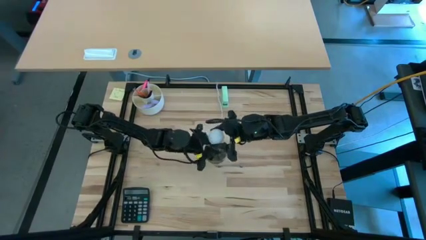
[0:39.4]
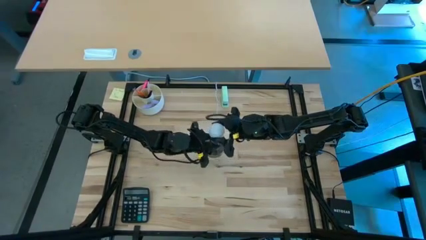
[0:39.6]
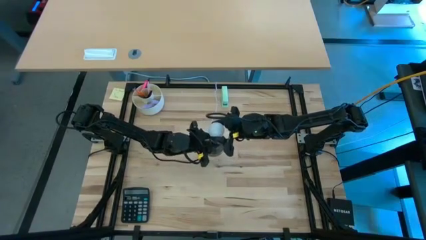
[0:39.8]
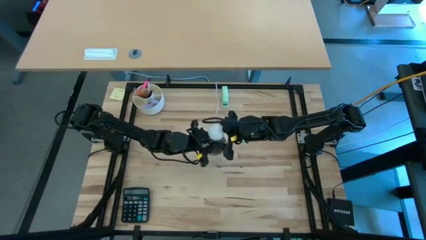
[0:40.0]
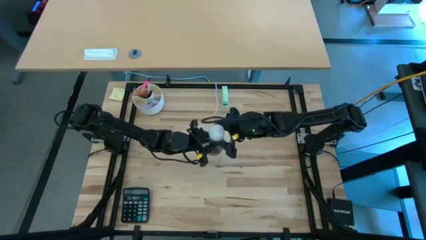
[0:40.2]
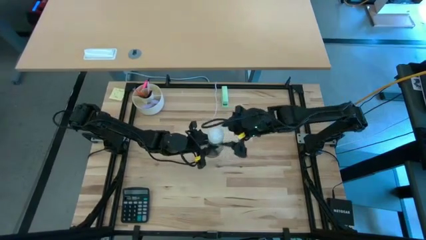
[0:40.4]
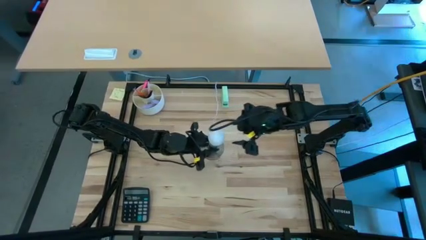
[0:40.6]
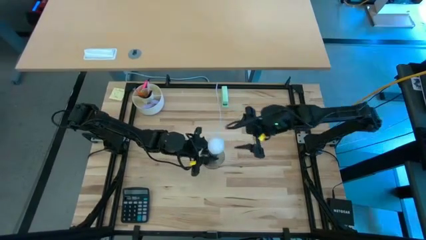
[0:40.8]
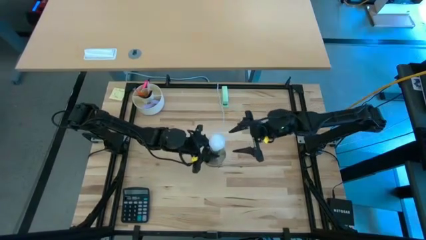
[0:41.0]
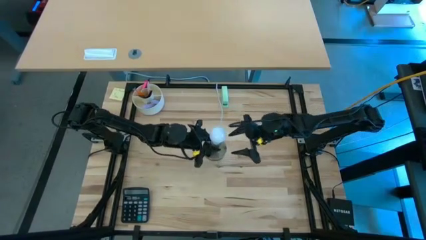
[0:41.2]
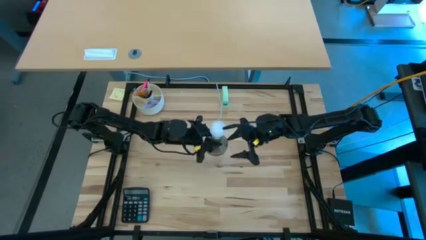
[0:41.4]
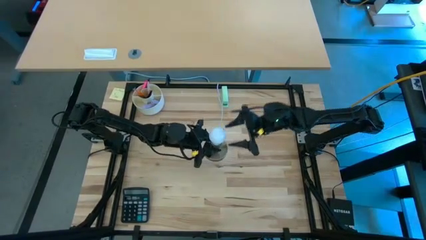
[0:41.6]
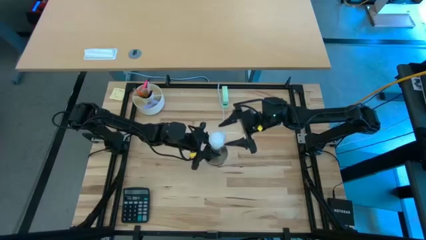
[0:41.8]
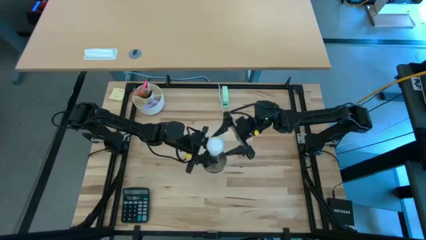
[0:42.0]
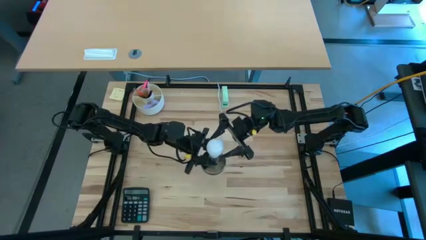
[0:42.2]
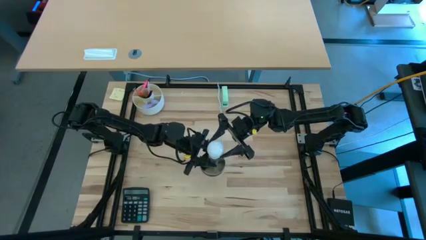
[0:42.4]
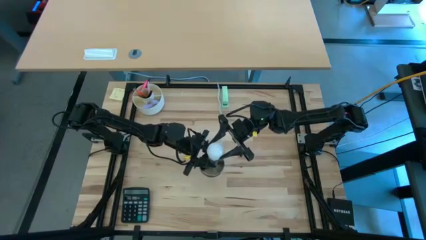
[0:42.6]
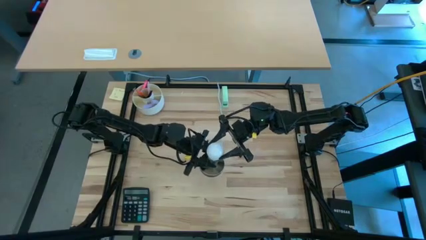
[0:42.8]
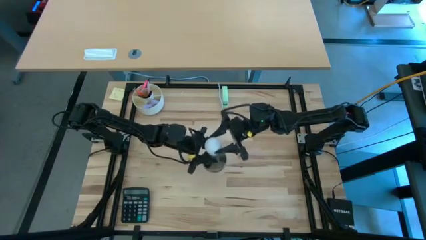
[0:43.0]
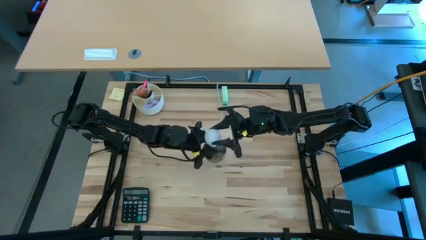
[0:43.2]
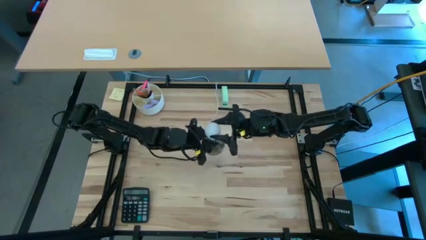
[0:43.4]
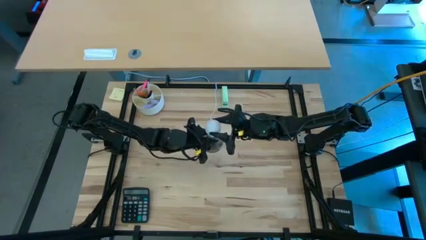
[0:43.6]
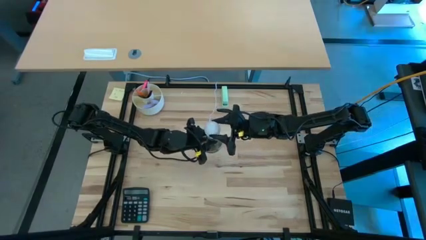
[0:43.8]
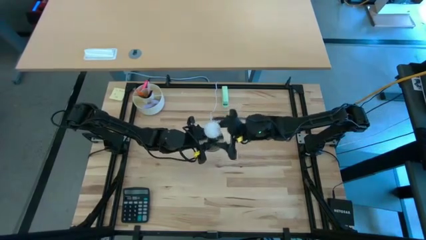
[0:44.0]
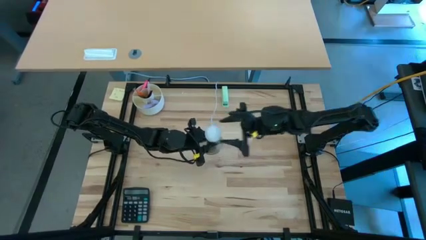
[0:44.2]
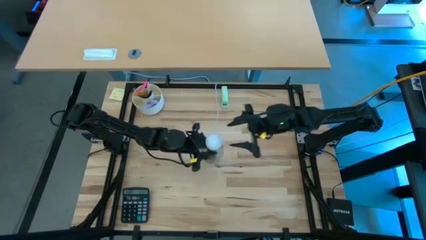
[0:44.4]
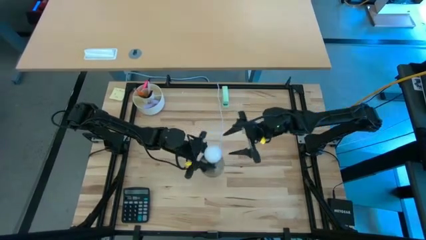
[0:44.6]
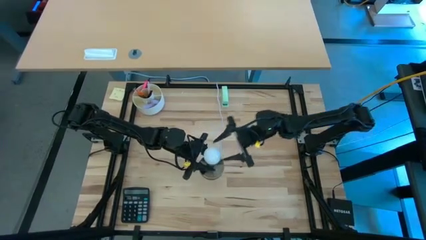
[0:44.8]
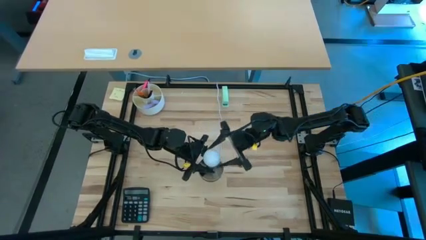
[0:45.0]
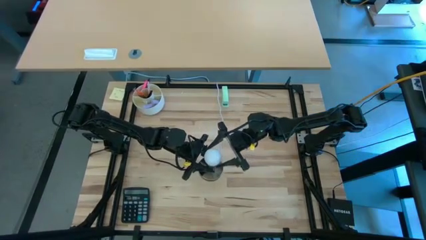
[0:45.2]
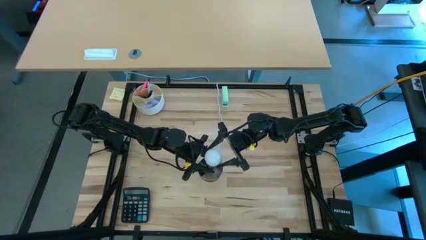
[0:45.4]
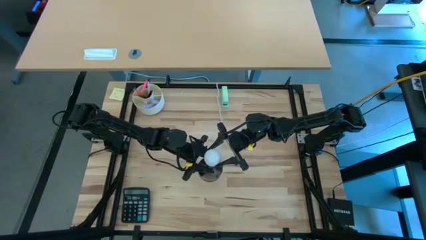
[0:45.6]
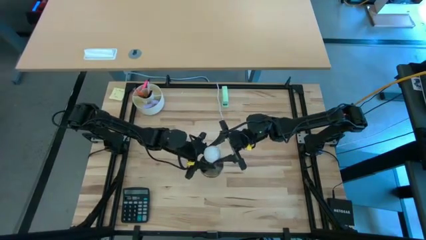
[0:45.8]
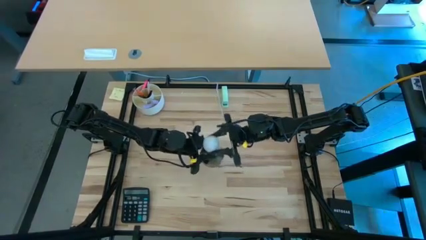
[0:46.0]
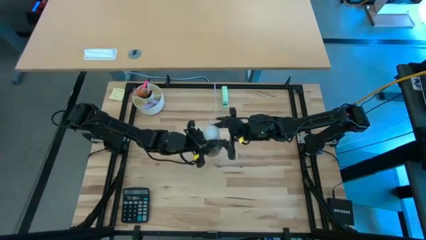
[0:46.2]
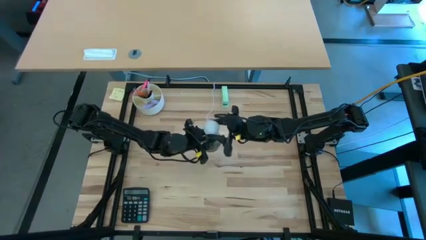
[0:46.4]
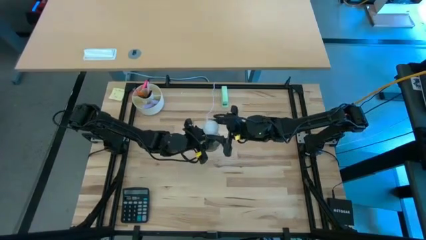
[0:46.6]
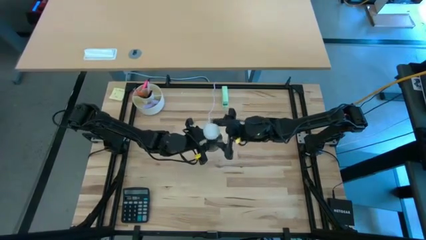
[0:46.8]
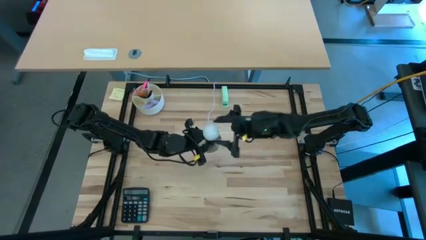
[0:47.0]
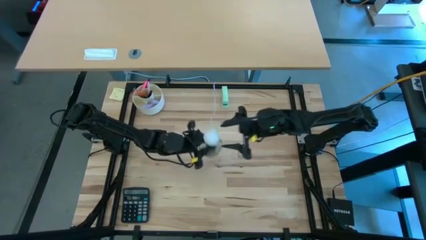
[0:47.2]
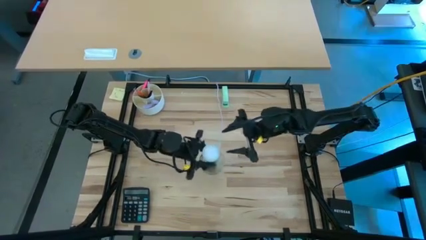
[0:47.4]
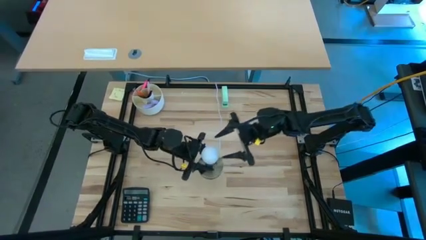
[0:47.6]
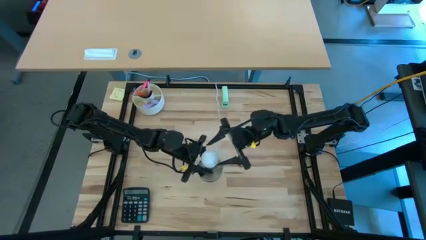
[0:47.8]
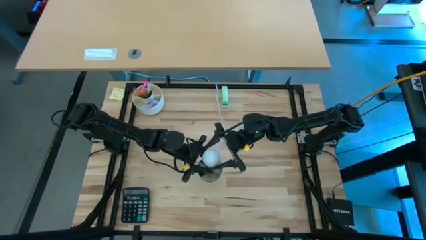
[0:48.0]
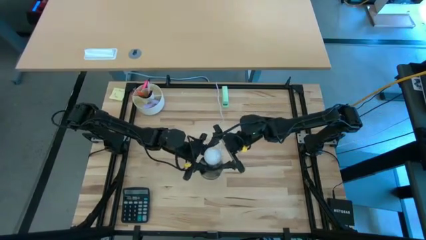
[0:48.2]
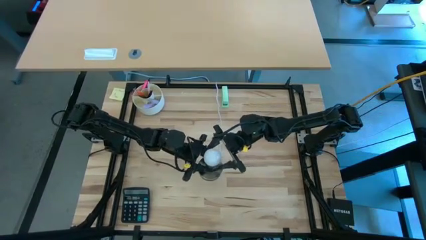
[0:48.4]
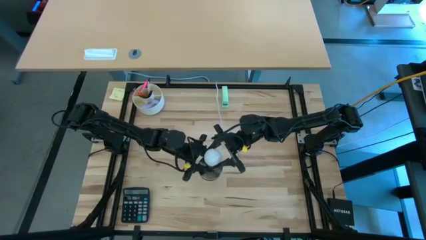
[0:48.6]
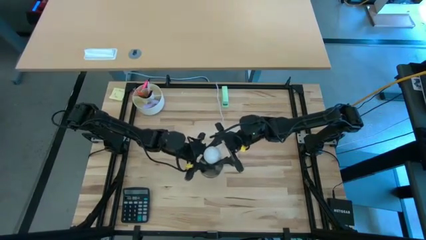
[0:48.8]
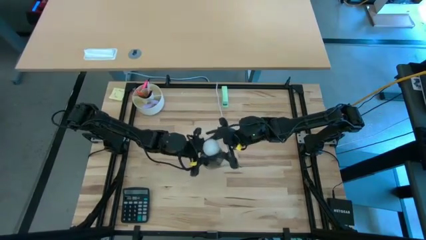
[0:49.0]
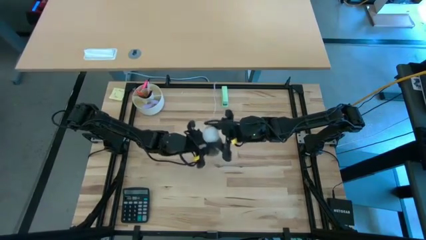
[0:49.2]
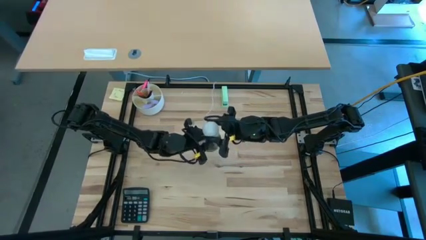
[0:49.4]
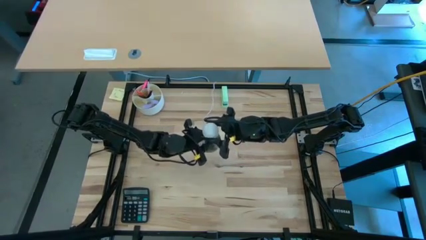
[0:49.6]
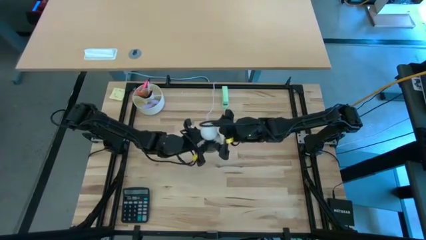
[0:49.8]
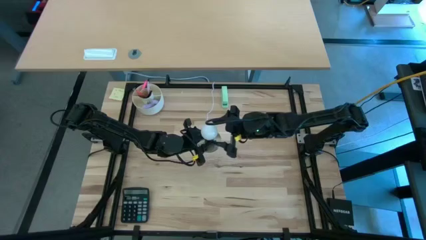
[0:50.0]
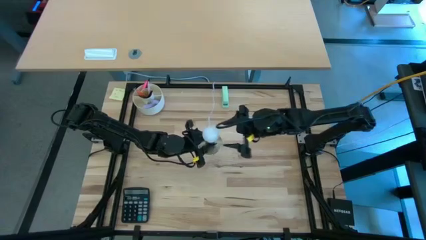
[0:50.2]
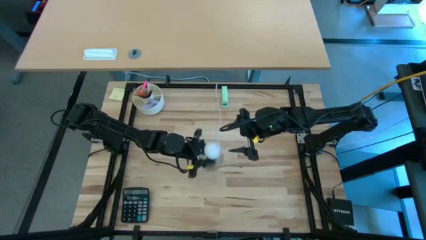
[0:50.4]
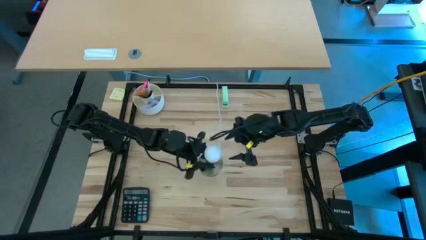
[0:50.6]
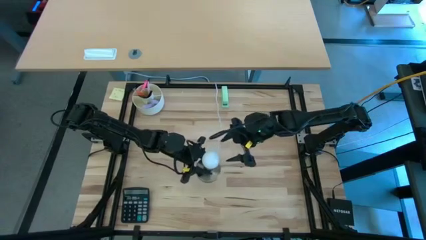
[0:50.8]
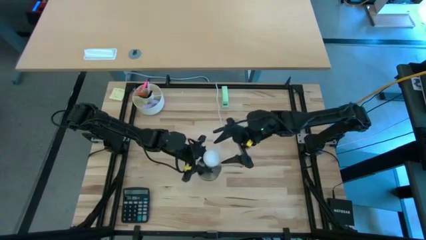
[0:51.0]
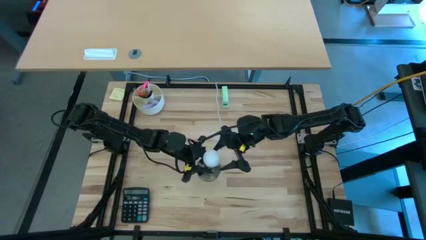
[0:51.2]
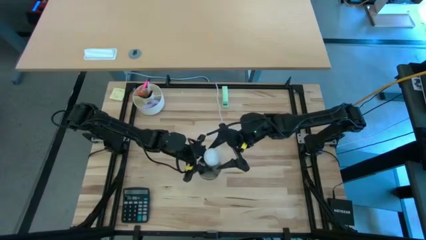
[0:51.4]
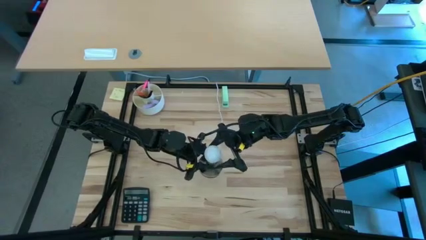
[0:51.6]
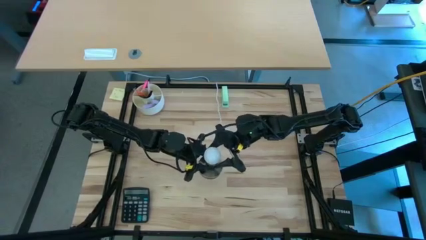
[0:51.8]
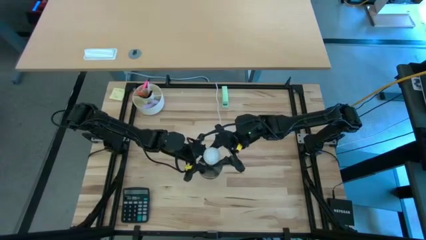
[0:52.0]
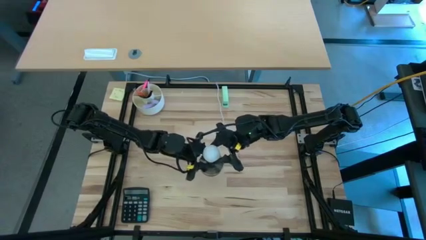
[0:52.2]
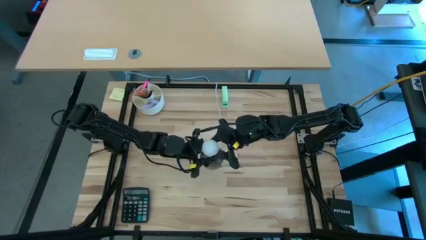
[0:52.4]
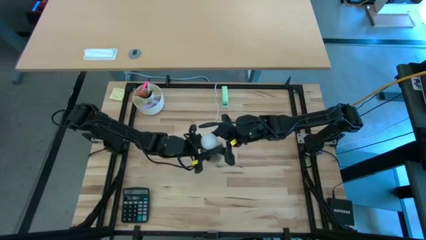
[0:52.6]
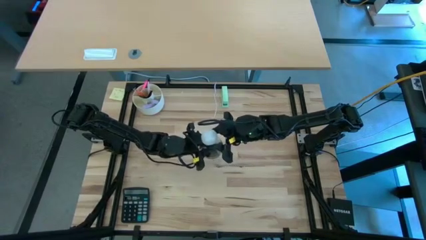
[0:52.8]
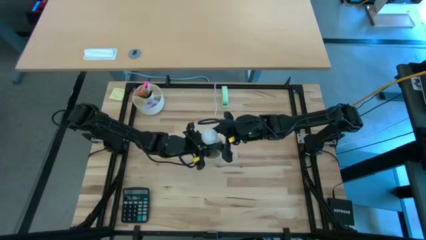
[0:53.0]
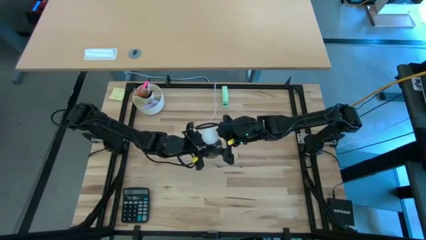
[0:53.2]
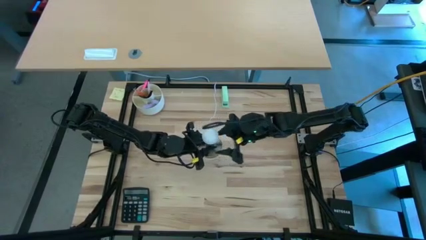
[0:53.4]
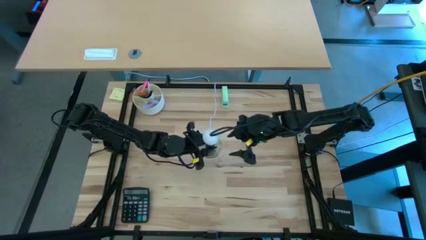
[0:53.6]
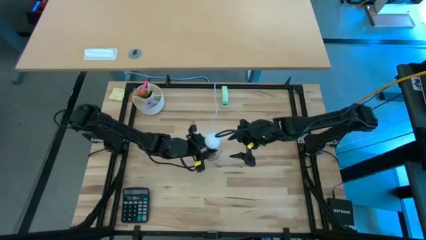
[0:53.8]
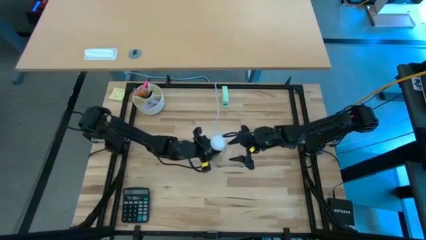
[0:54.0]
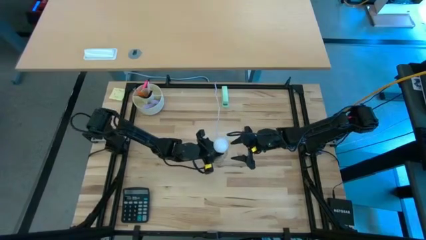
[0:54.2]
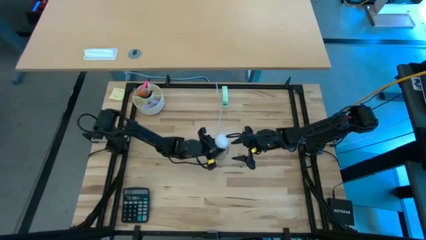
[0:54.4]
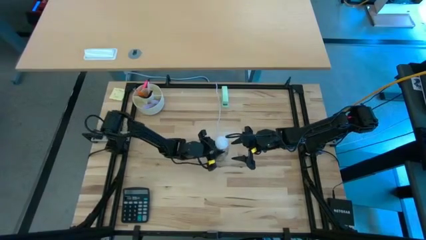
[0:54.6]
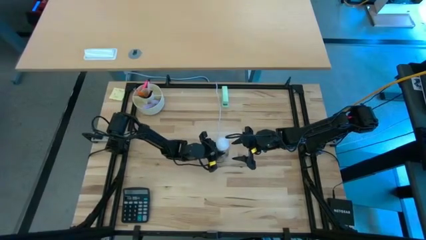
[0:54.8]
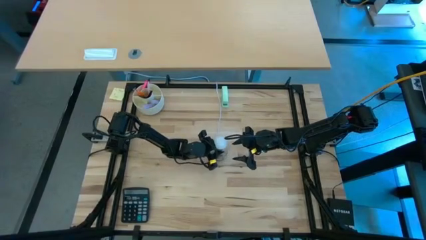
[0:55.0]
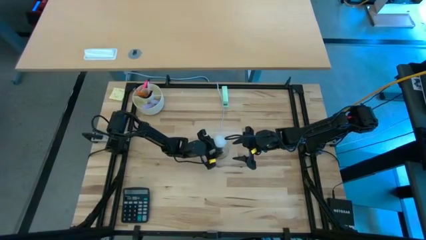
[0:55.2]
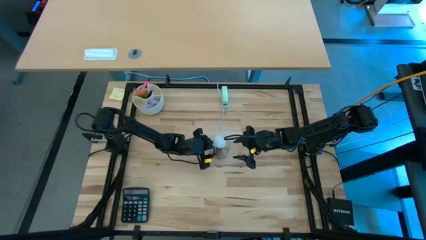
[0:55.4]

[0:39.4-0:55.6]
Task: Screw lightbulb
Insert the lightbulb into the lamp
